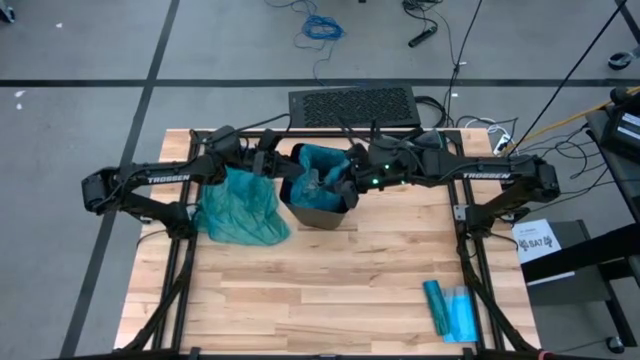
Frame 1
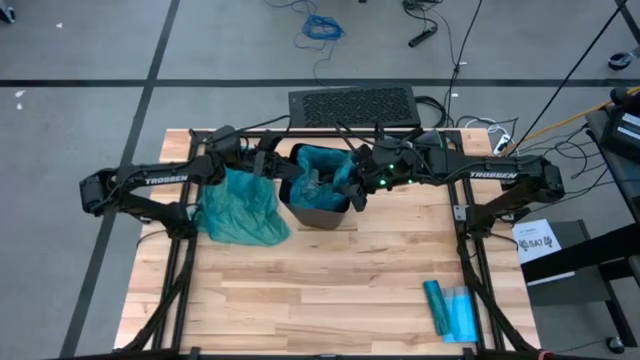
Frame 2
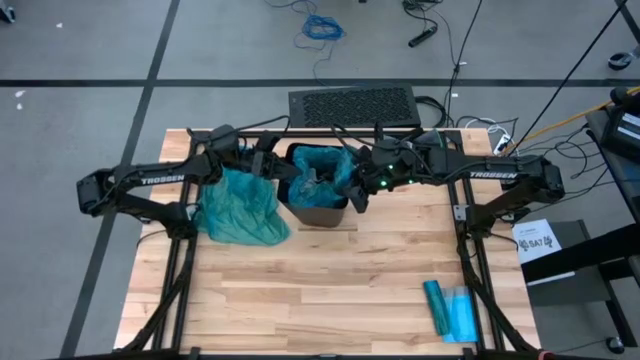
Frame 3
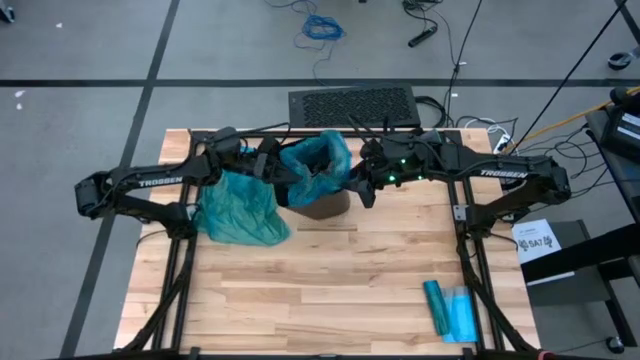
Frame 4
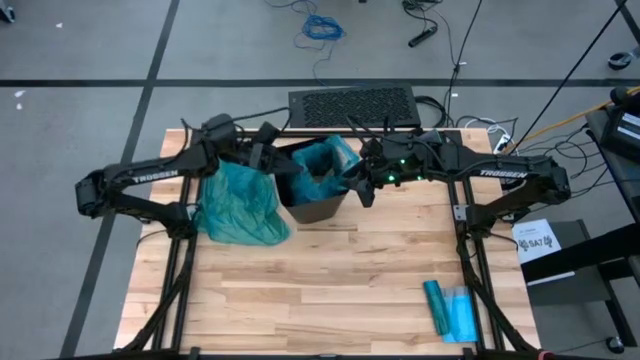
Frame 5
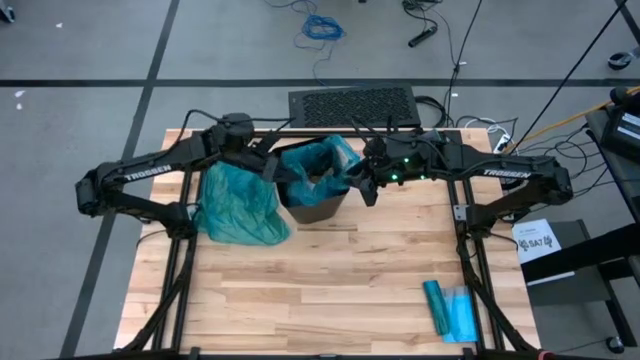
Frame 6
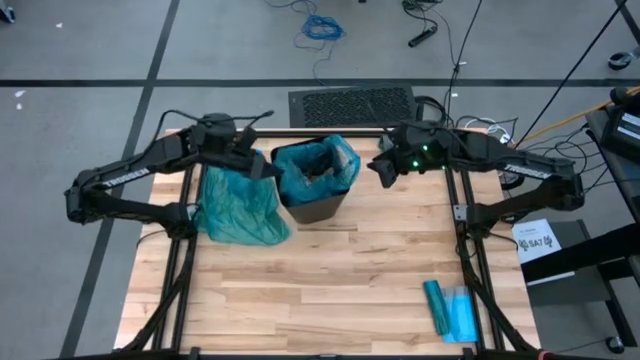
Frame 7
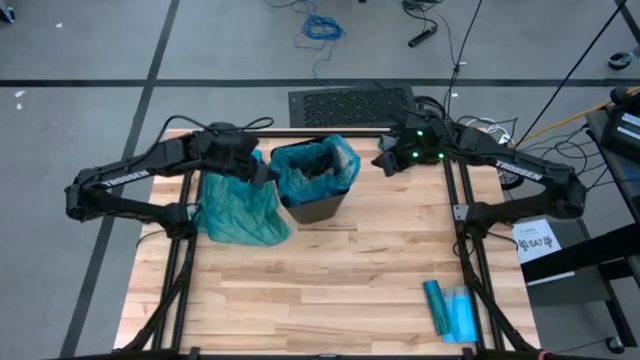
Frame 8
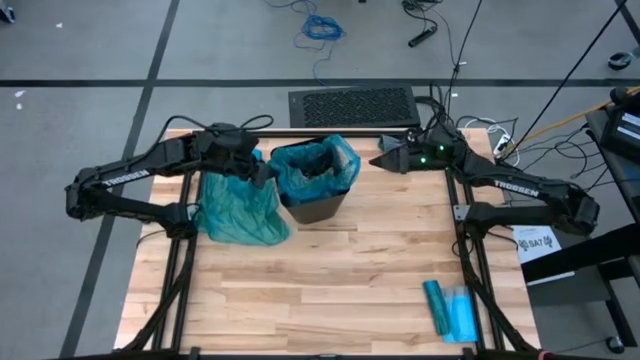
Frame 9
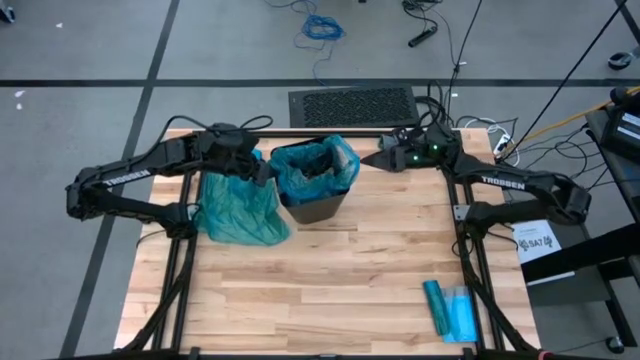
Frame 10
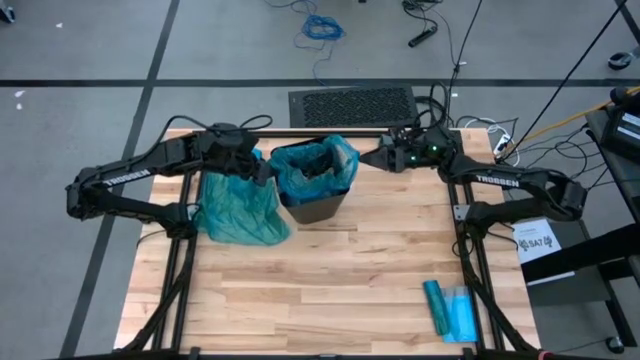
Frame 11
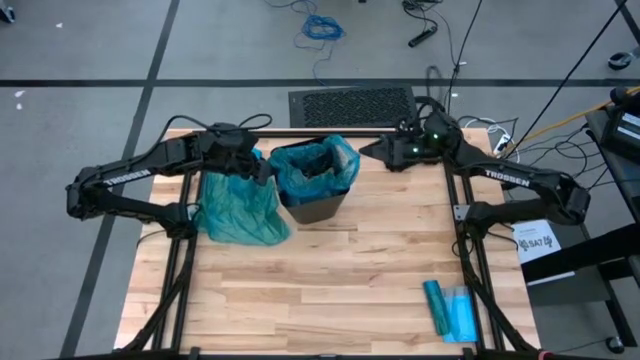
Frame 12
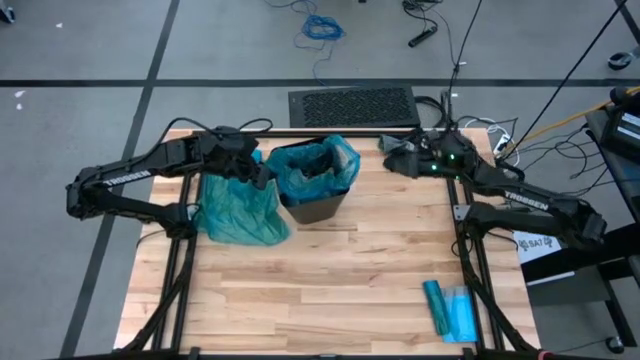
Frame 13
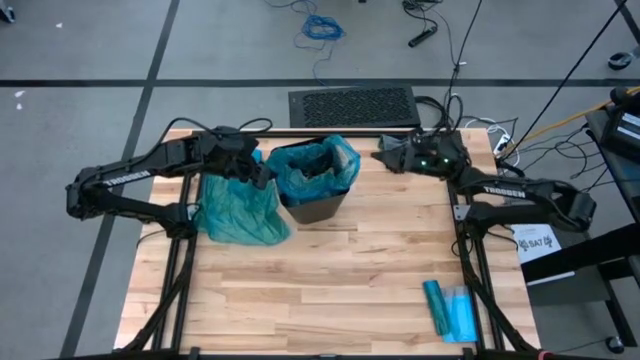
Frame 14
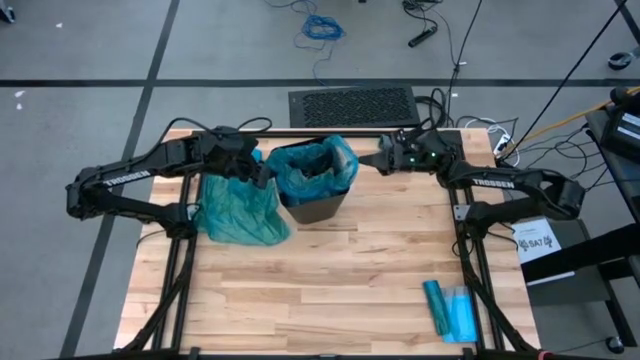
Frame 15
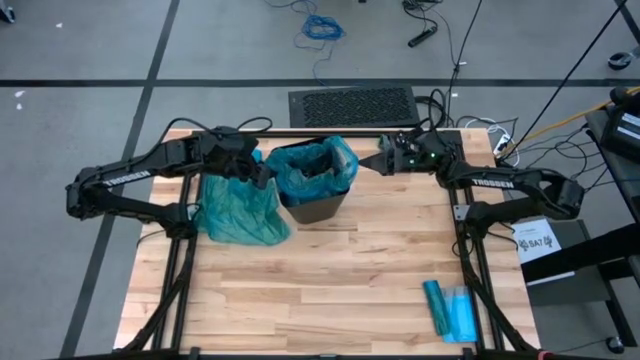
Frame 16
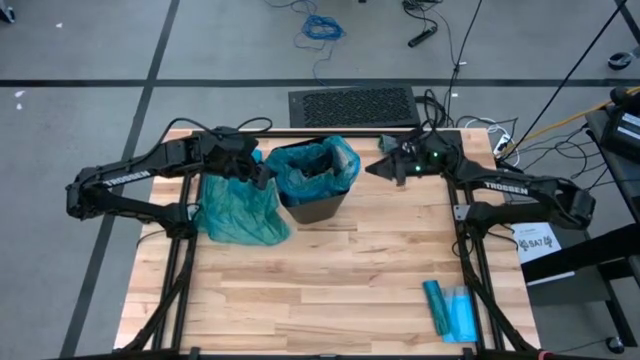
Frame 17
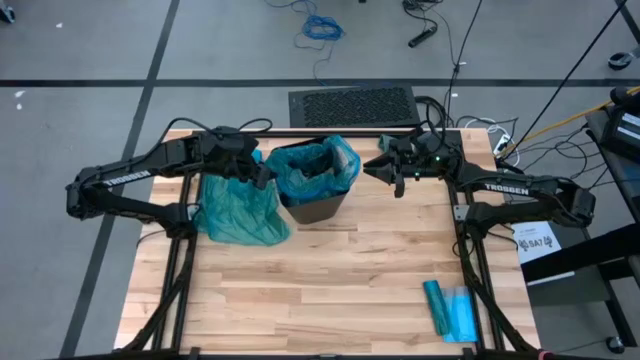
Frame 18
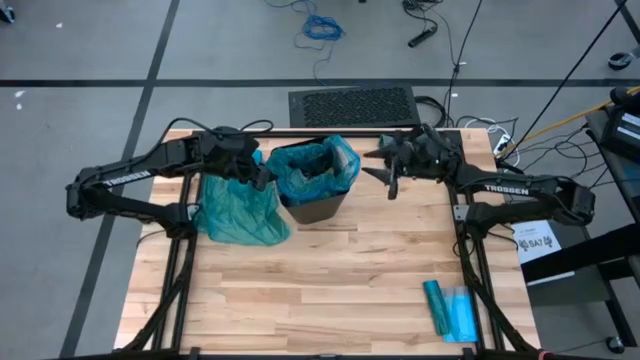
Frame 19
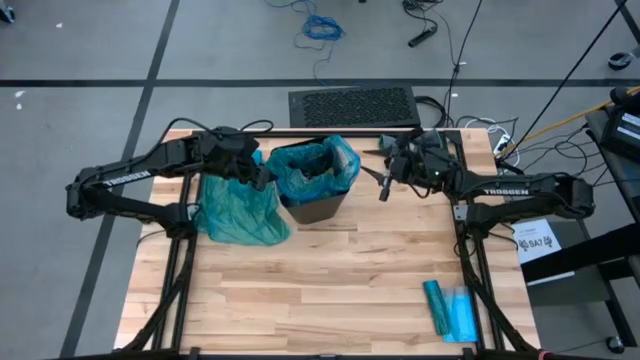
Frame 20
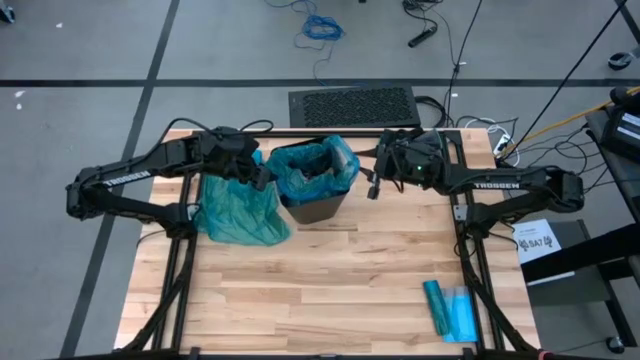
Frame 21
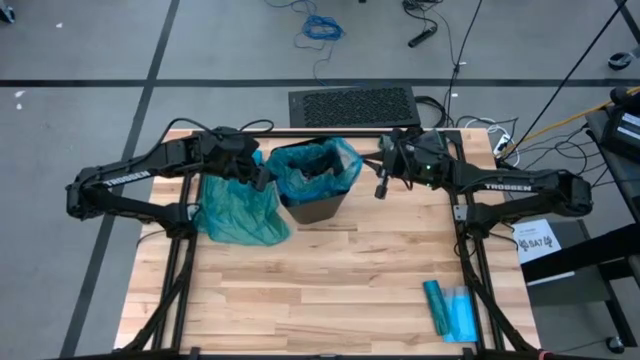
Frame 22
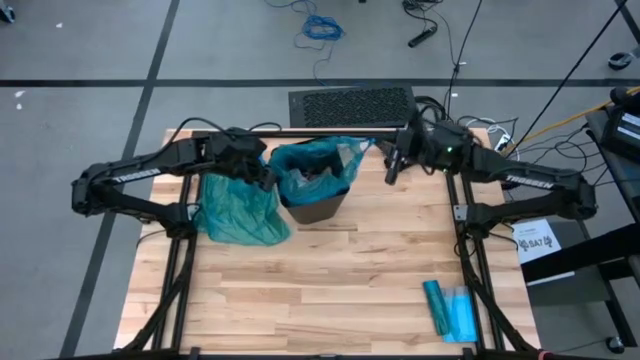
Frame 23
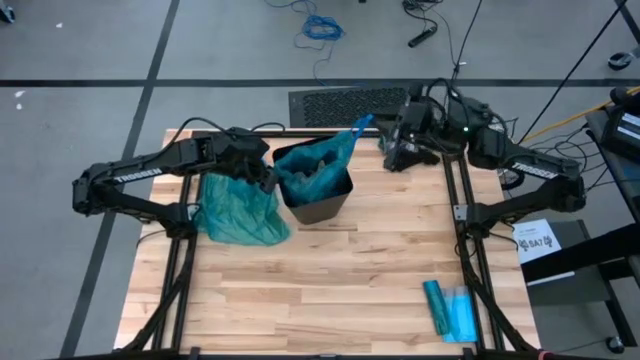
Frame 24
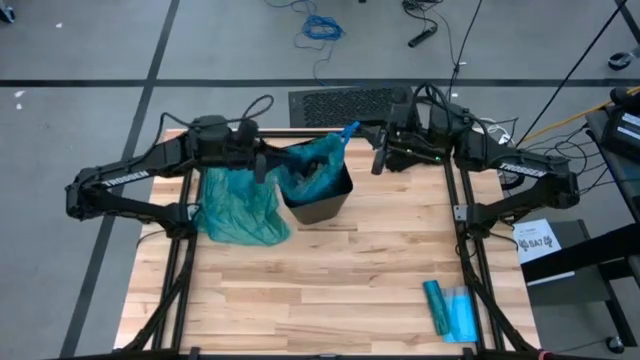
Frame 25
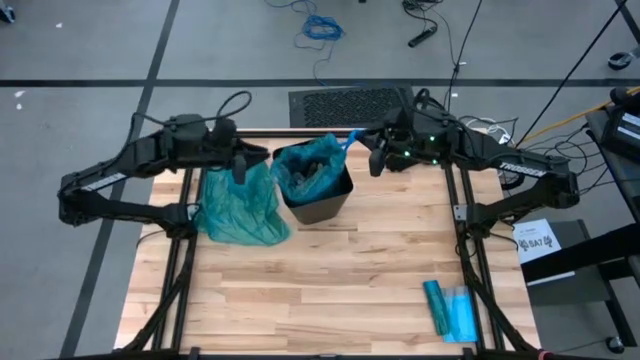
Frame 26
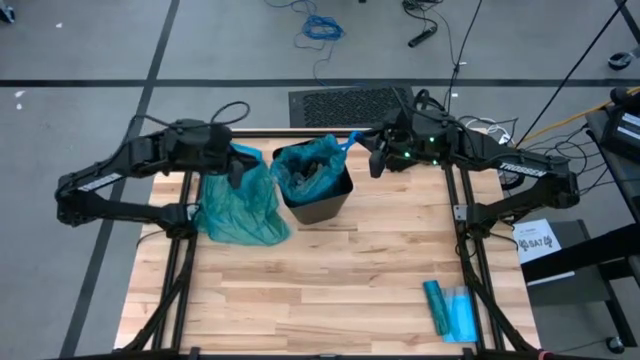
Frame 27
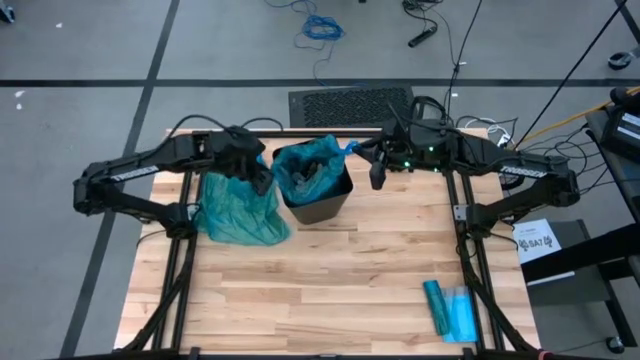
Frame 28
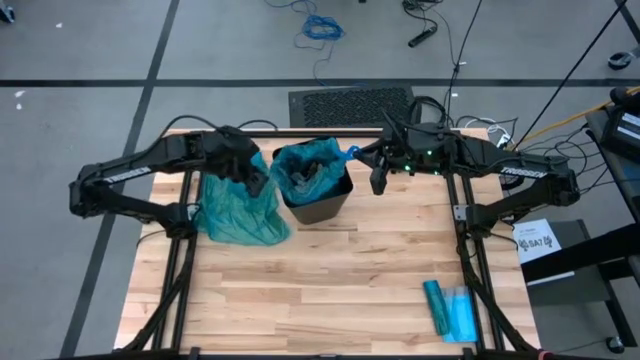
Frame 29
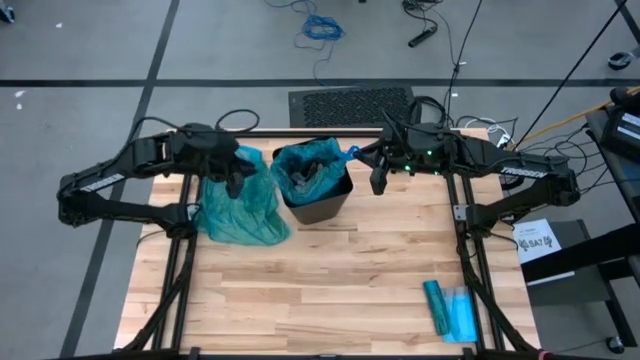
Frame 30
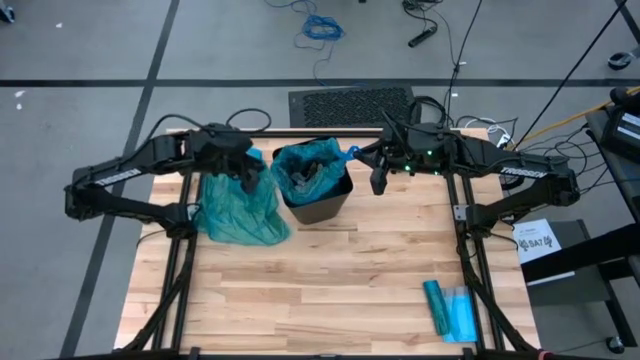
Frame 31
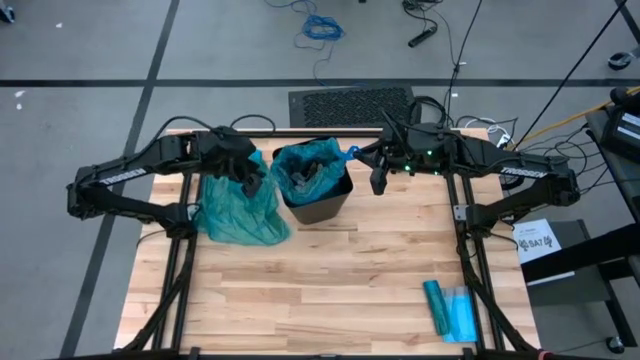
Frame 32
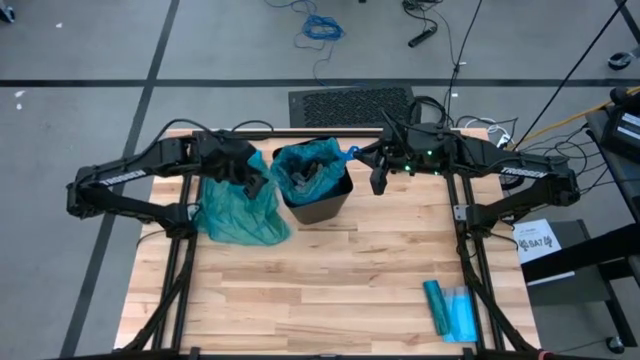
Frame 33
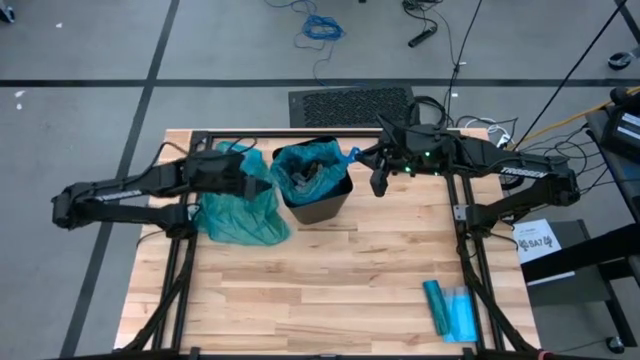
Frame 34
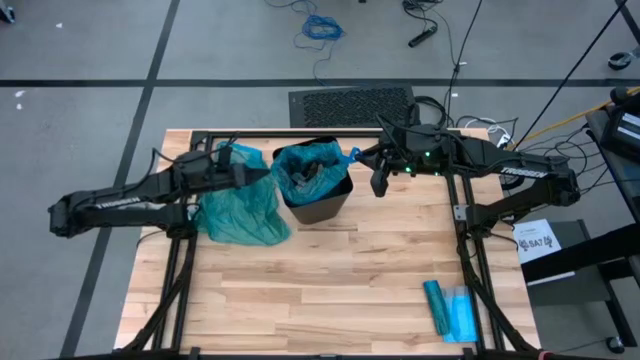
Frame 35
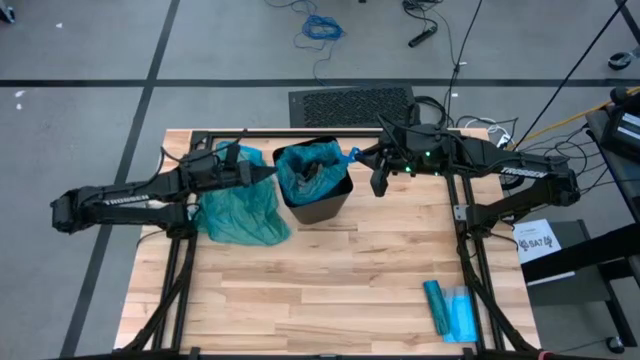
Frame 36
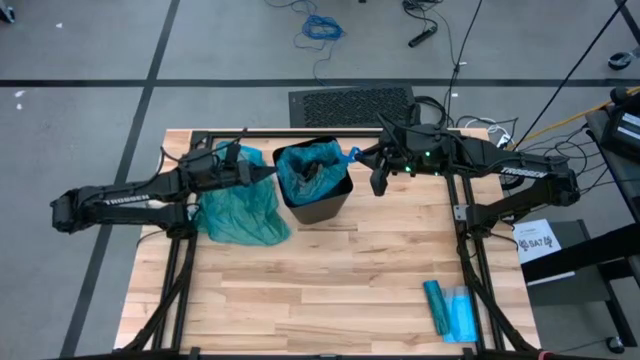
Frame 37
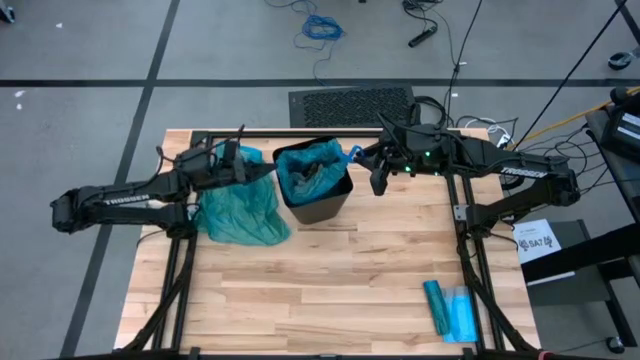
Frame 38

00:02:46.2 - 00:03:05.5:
Task: place trash/remove bag and relplace
Remove the trash bag from the trash bin

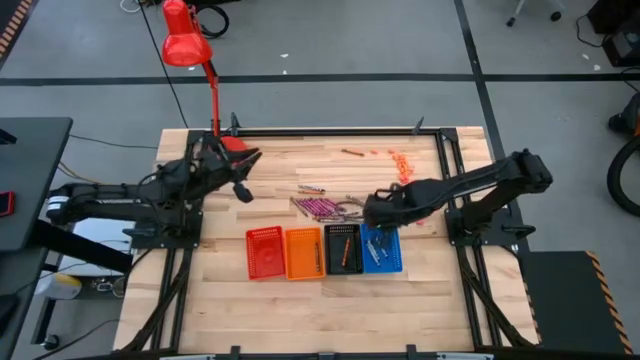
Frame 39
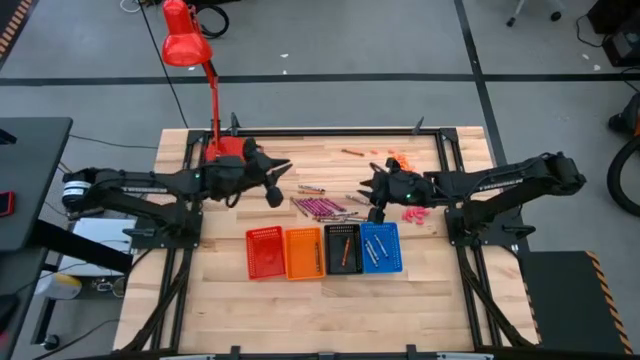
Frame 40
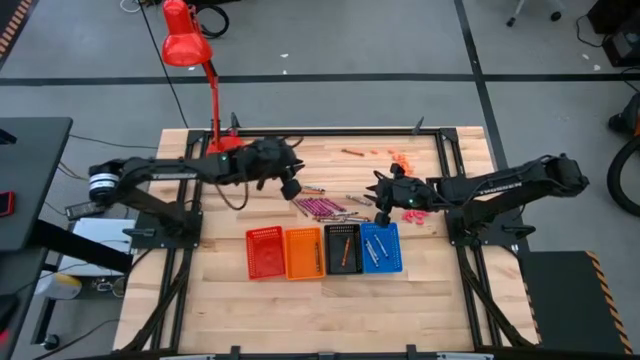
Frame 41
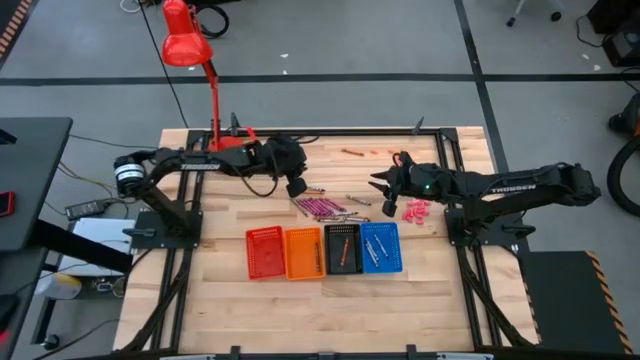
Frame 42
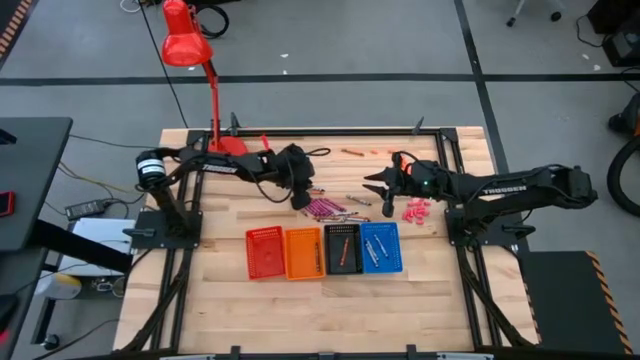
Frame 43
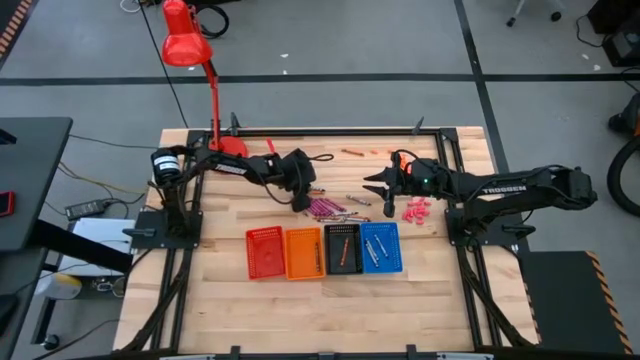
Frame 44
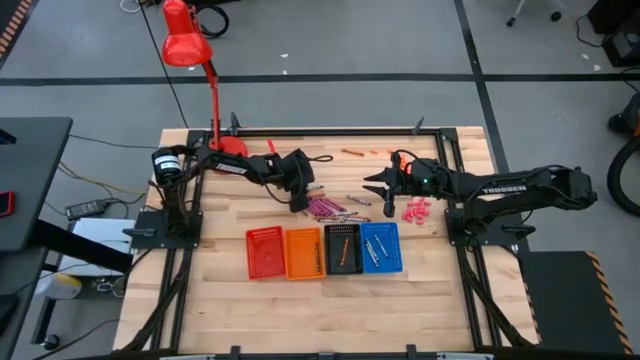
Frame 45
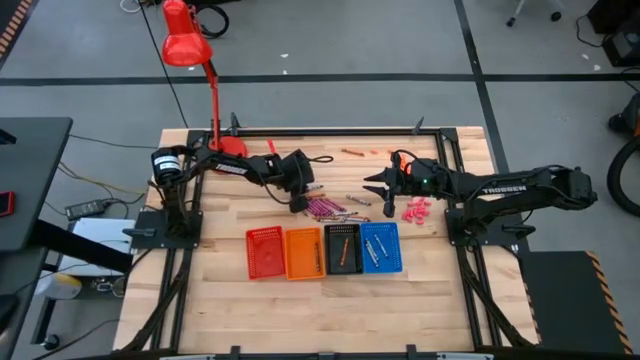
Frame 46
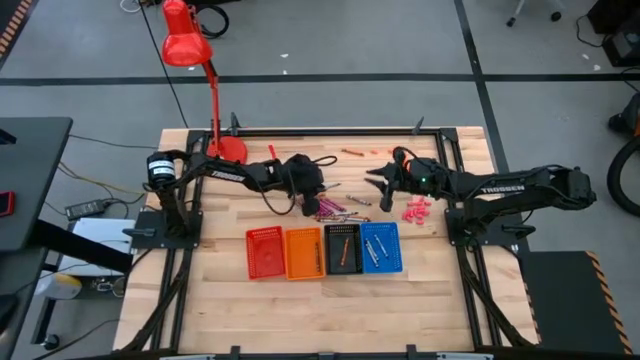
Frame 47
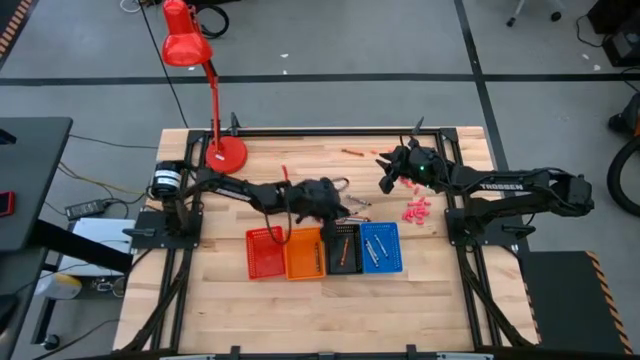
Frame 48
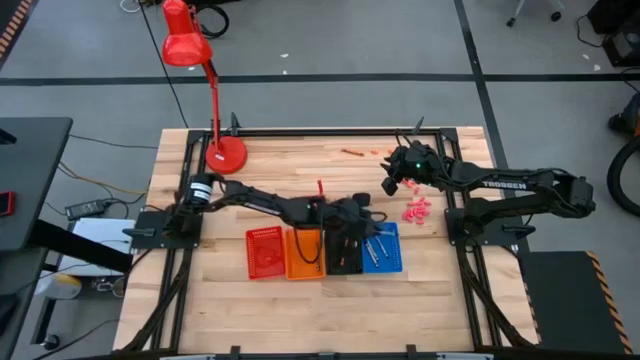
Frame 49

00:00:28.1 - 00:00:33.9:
Task: Sort crayons
Put the black crayon into the blue bin
